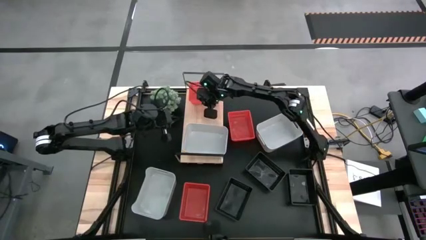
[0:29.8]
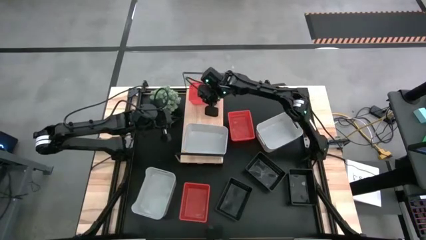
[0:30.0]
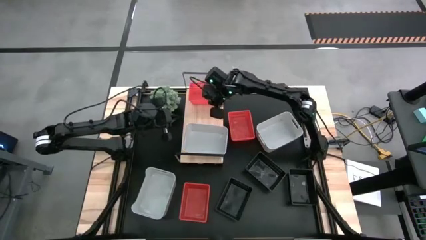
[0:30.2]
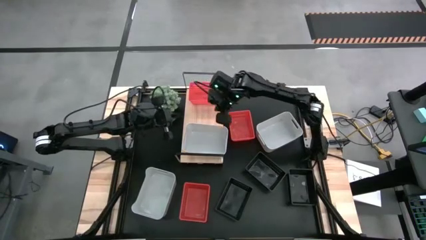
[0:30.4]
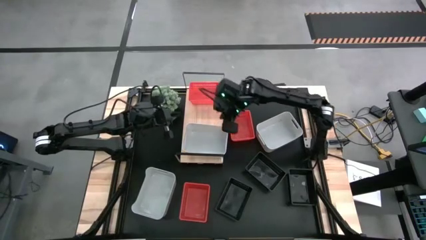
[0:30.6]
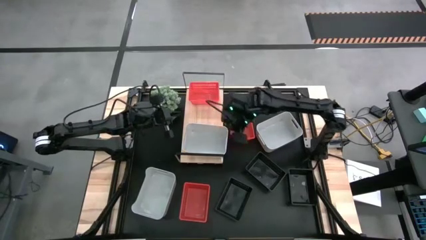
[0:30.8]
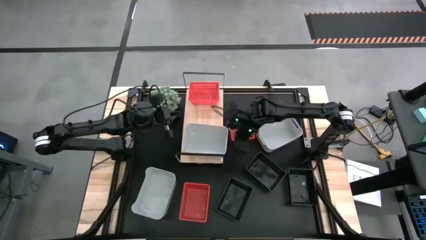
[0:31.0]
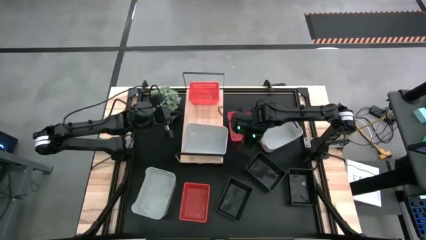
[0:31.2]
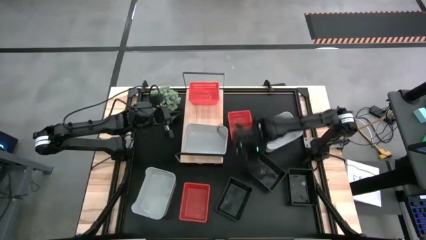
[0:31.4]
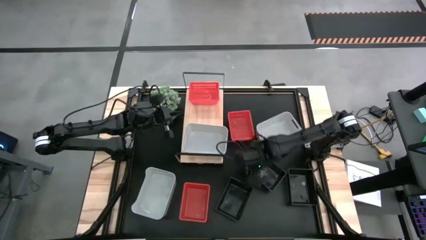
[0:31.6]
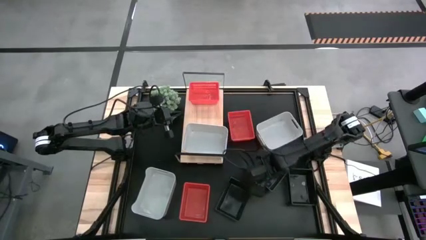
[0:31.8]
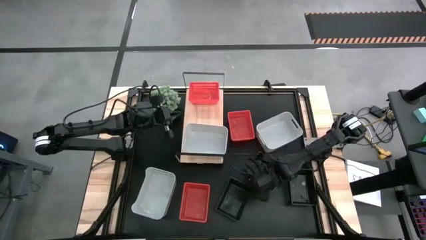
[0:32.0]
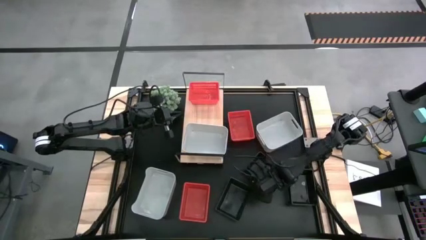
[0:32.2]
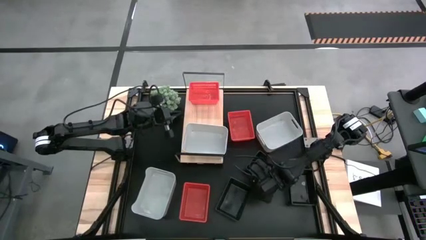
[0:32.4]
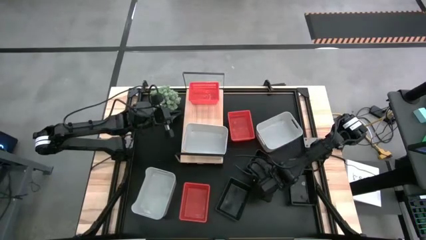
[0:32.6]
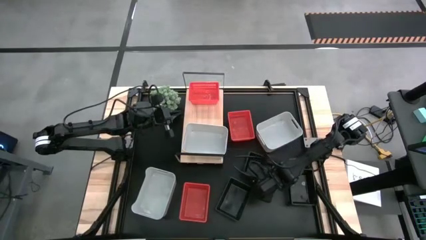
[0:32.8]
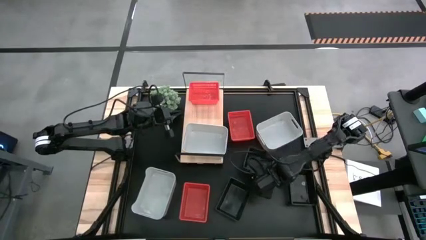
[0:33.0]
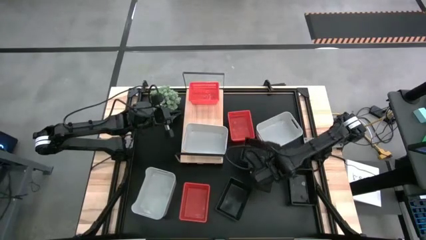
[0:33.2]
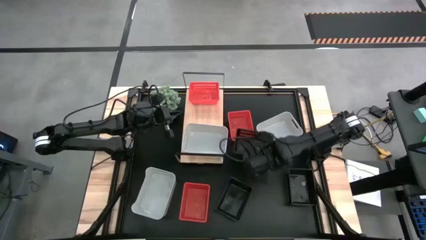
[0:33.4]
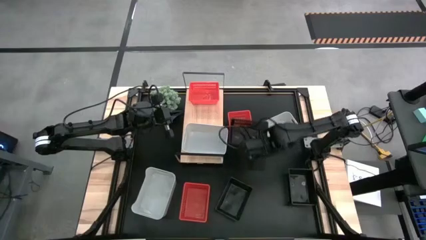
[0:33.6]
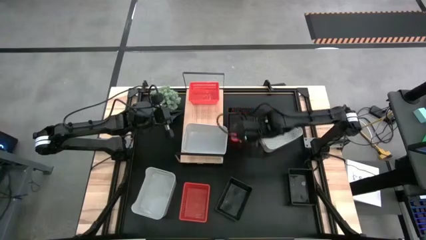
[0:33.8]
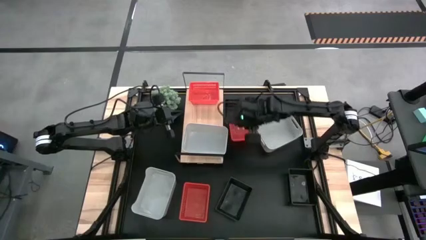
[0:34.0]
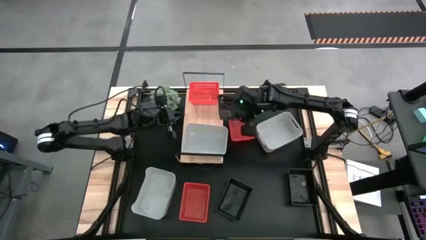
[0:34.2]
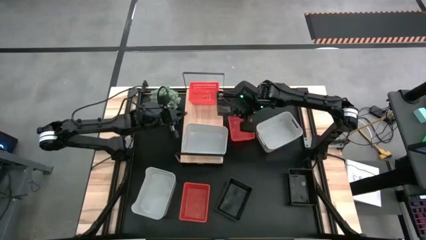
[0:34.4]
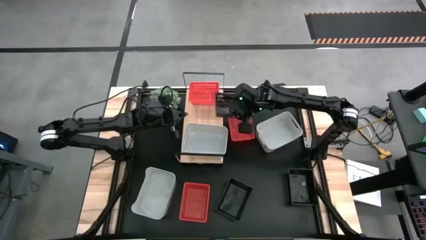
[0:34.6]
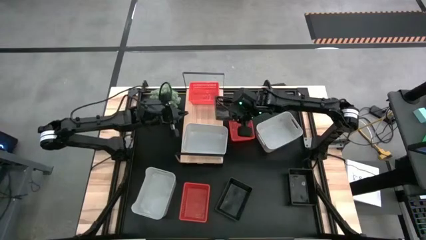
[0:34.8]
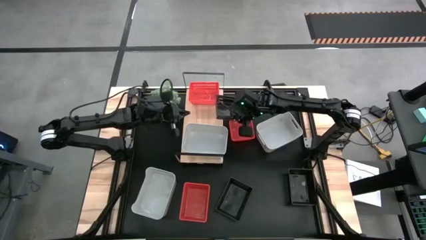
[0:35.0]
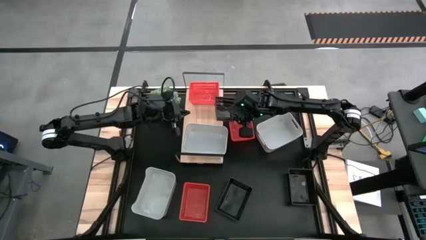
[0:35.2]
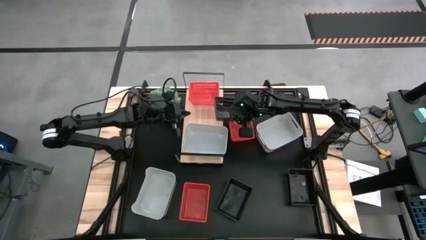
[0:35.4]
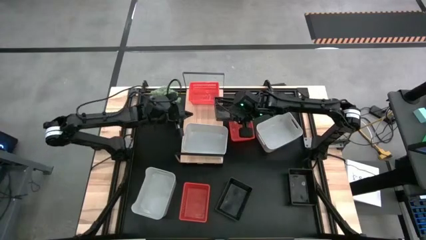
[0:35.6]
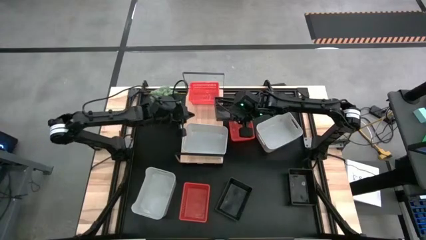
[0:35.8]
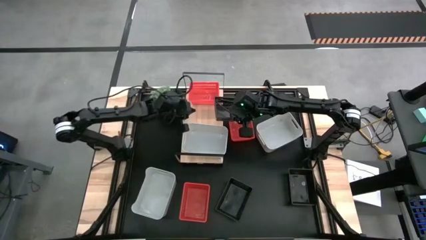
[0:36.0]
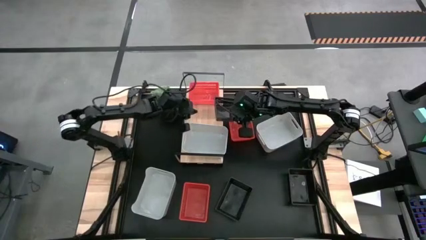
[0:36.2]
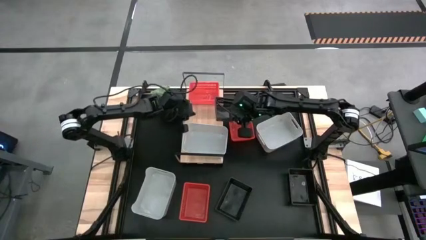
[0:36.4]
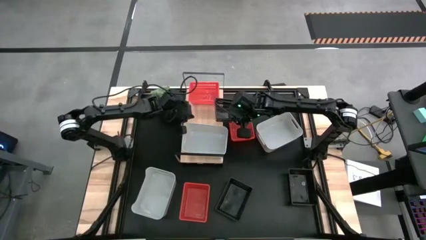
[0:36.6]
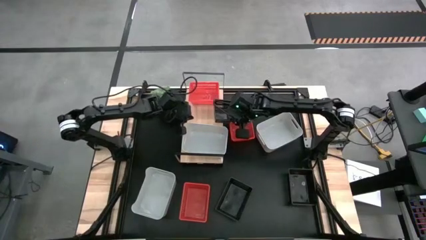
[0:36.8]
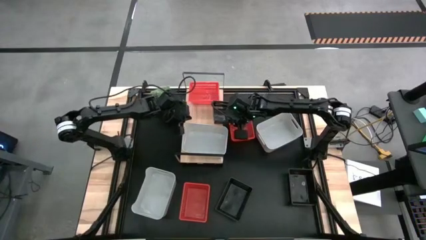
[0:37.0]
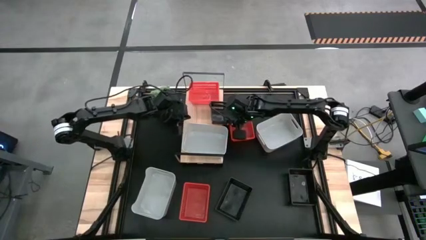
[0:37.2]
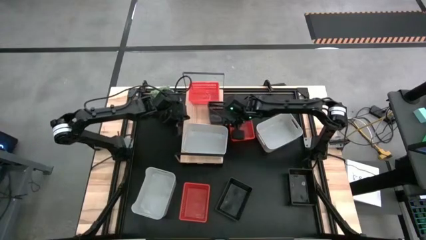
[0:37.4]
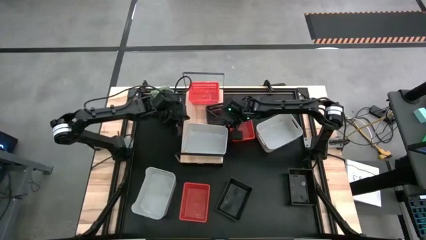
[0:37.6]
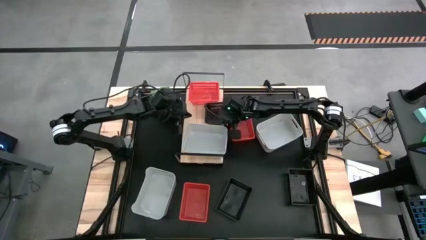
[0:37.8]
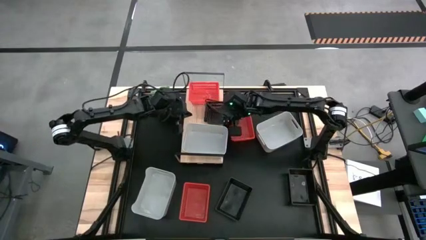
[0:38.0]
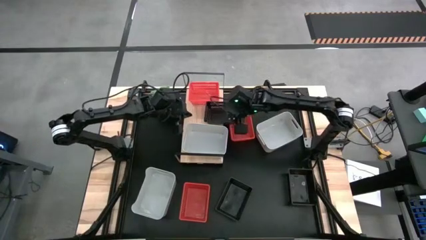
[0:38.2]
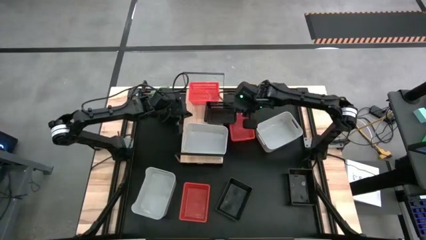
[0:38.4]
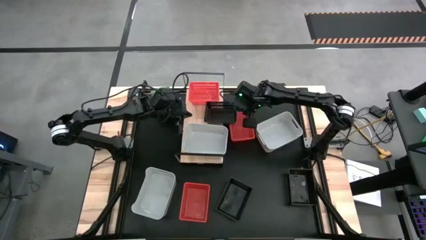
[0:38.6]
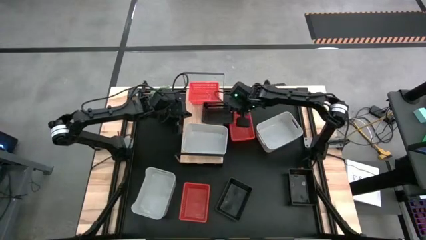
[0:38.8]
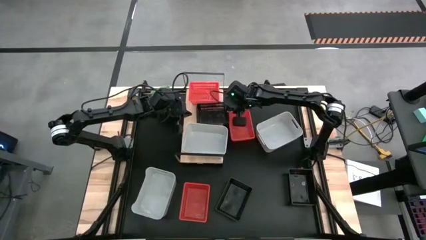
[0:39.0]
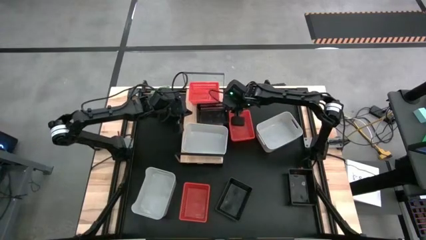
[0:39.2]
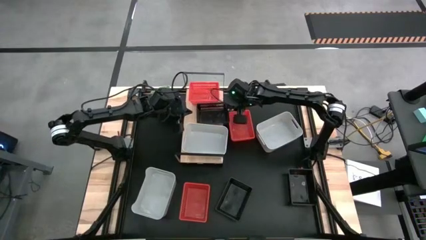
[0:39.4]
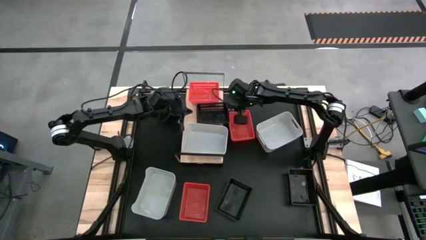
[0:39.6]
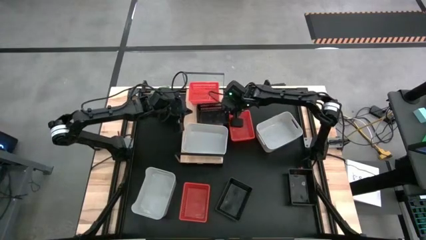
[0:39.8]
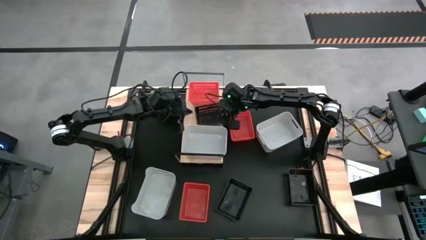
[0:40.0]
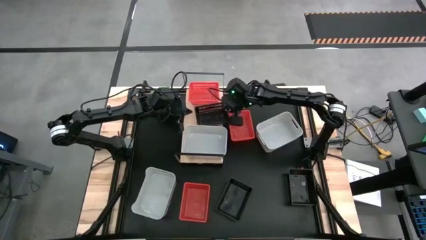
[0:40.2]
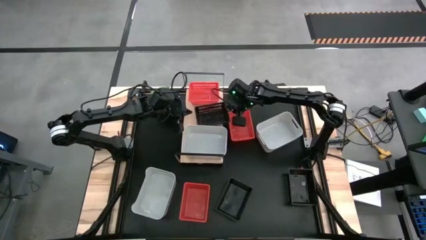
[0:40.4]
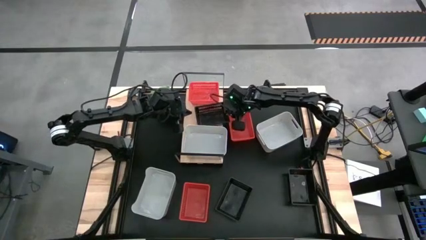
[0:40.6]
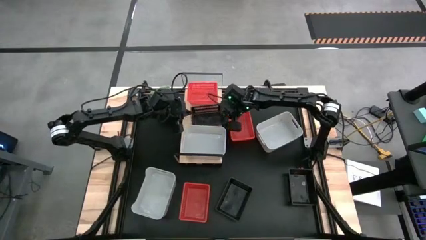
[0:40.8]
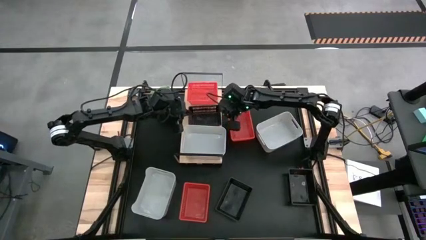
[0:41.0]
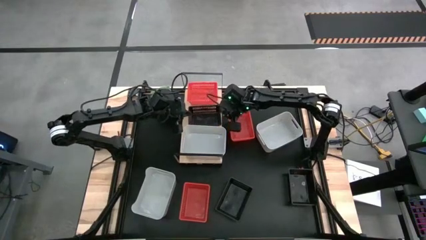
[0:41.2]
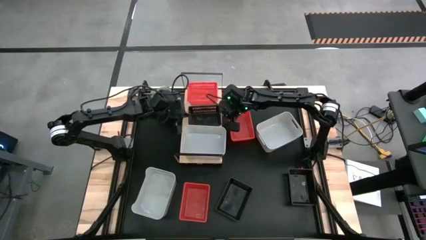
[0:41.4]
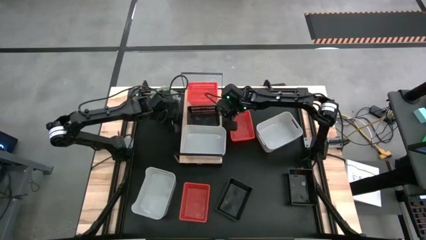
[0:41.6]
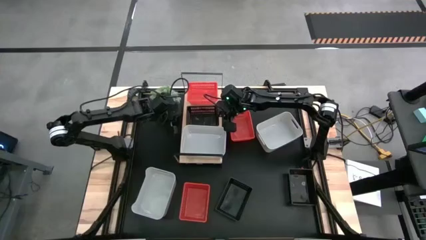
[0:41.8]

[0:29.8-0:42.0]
Task: Stack baskets on shelf by color
Put the middle black bin on the shelf

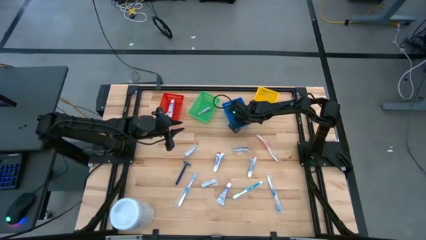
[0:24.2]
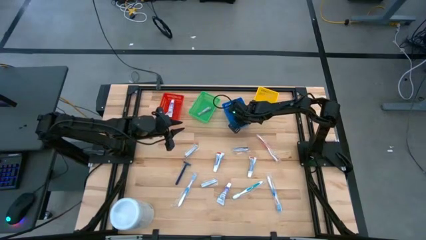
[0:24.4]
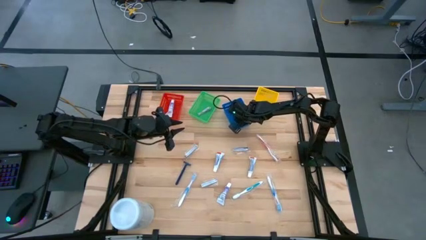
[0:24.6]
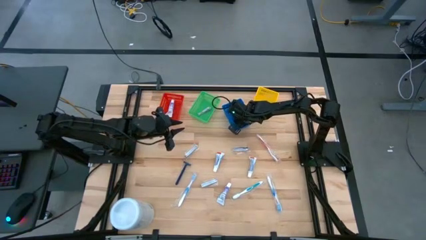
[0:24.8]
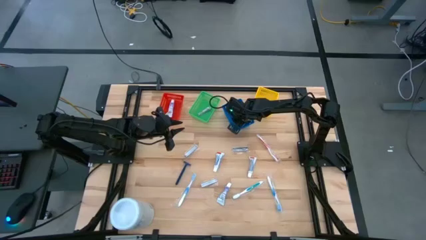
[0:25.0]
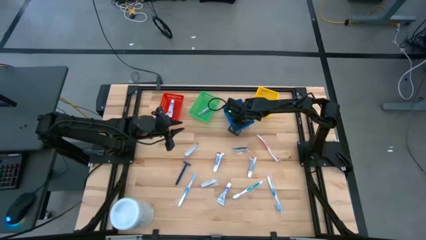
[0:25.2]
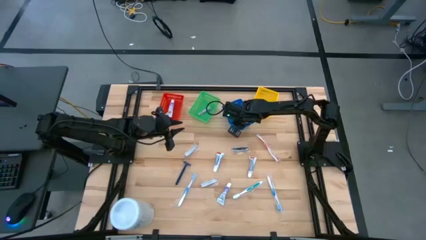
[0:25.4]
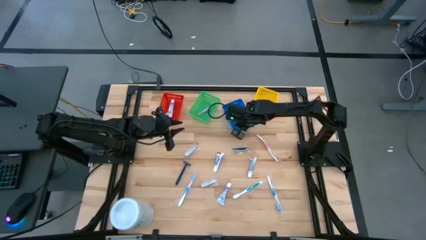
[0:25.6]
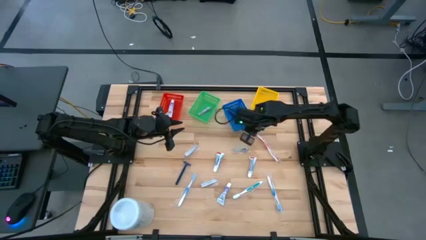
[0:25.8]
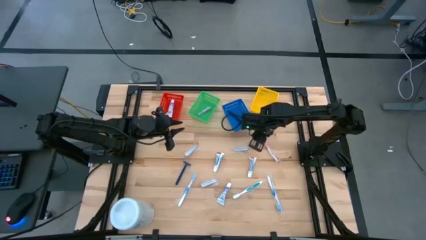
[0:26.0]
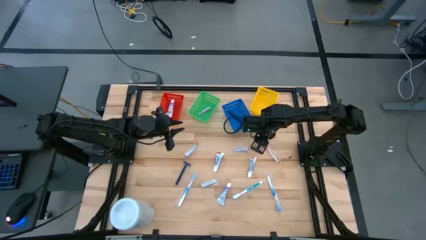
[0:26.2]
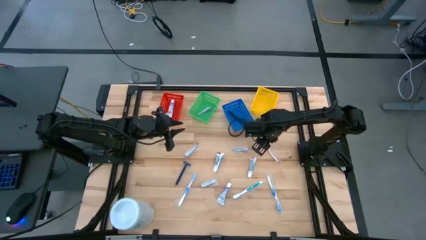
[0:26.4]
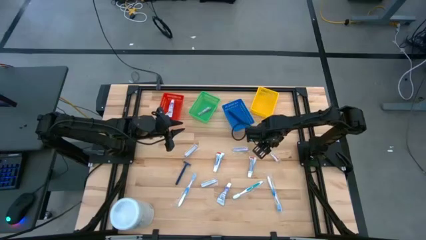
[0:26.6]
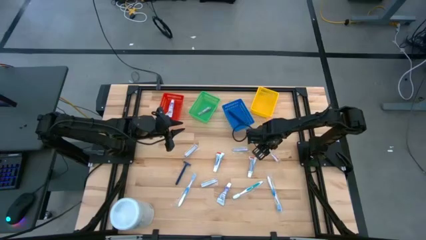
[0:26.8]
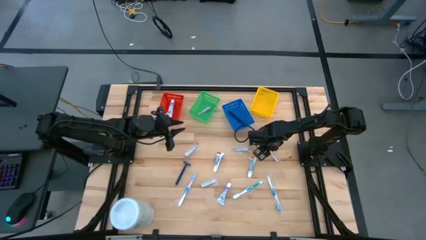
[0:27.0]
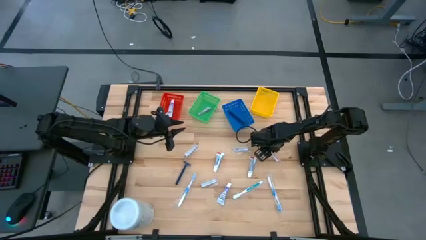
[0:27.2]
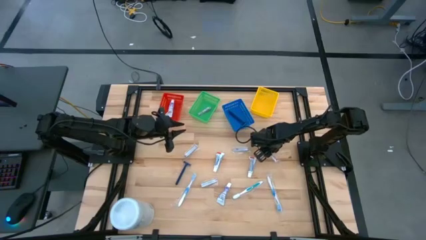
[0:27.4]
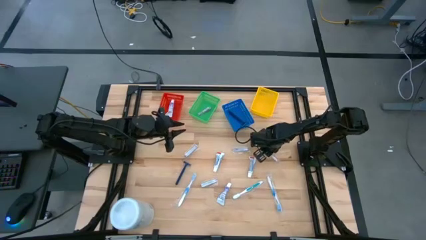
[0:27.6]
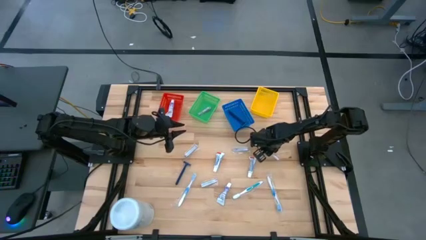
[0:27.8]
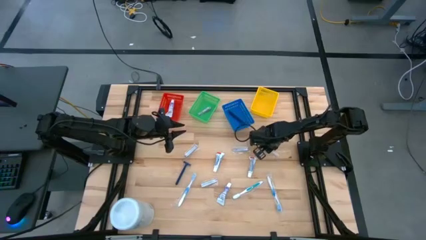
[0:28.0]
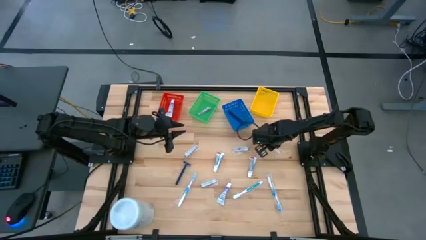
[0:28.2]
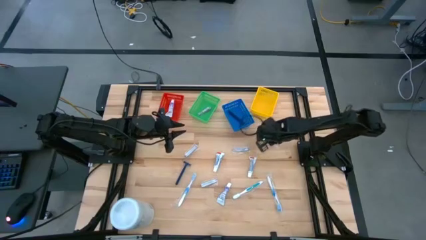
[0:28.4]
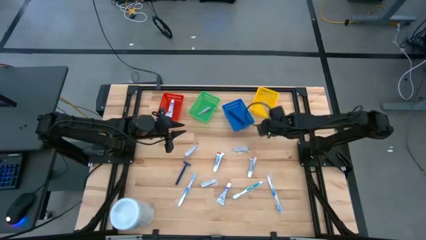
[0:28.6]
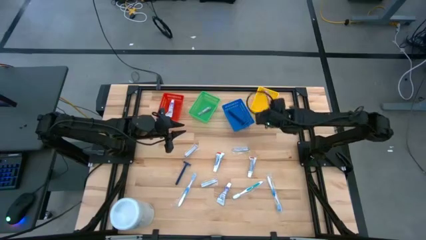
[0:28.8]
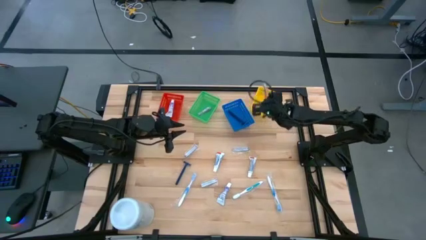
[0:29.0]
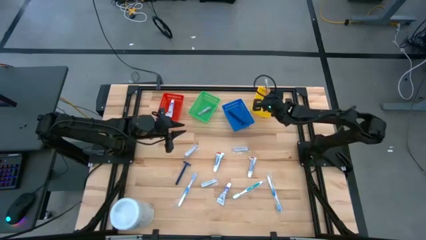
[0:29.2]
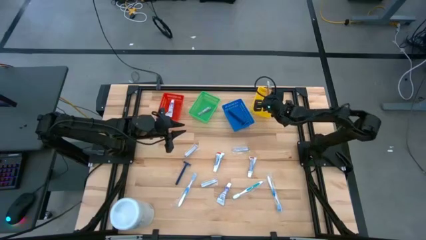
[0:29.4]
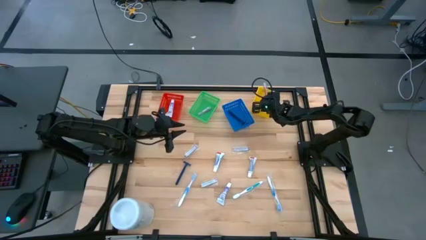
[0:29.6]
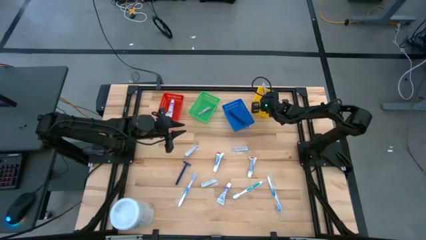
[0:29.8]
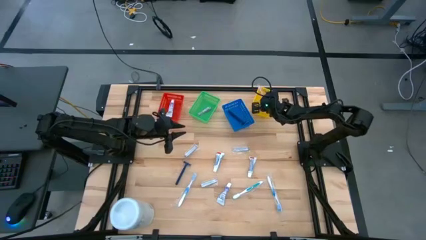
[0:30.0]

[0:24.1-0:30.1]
Task: Pick & Place Travel size toiletries
Put the red toothbrush in the yellow bin
